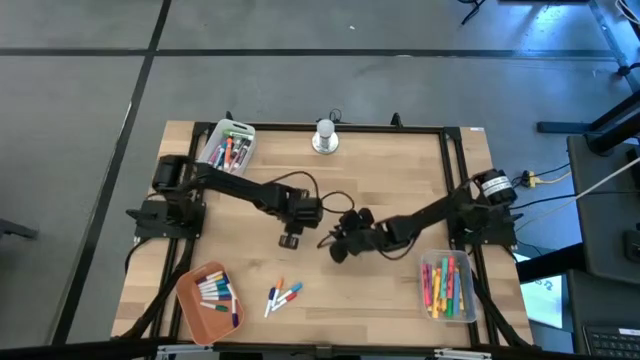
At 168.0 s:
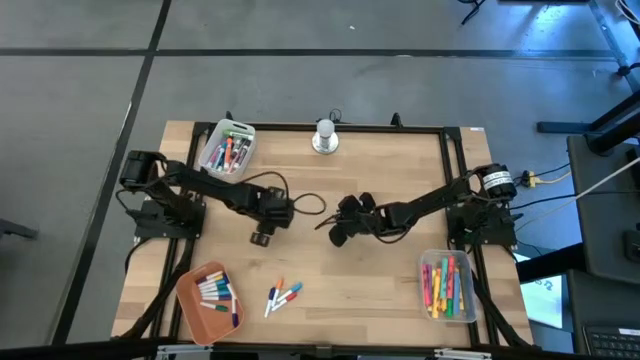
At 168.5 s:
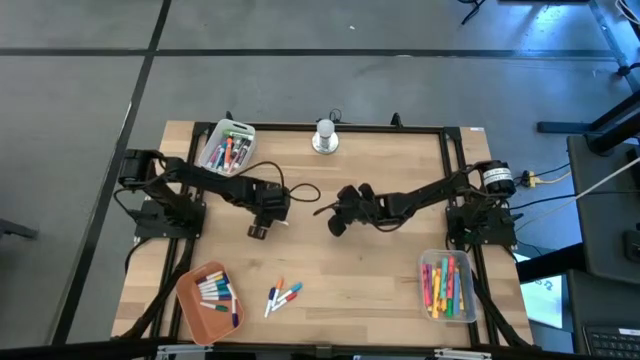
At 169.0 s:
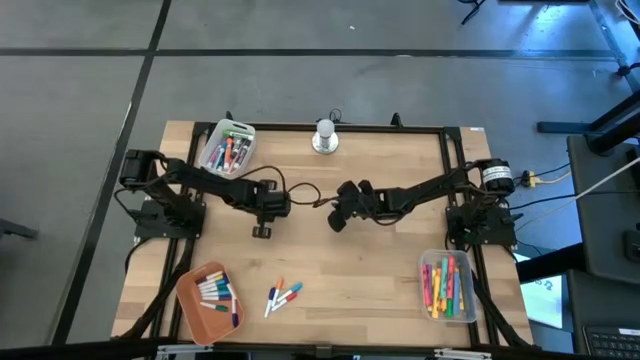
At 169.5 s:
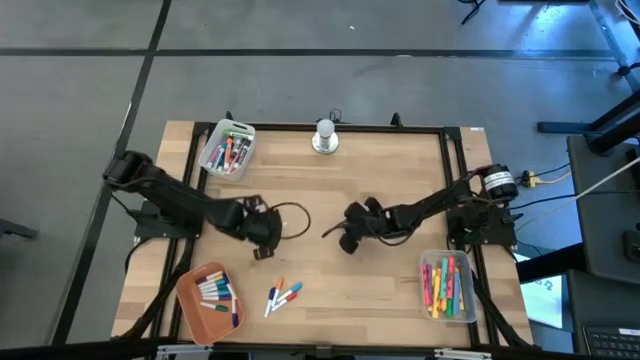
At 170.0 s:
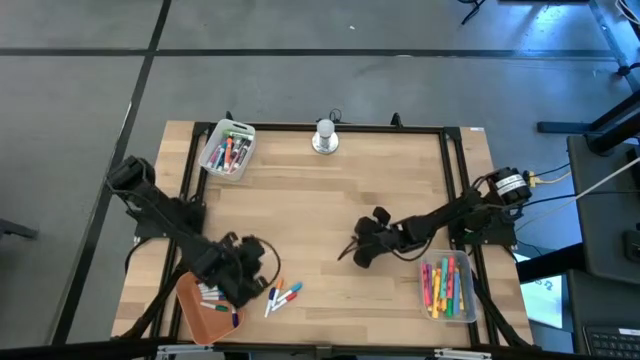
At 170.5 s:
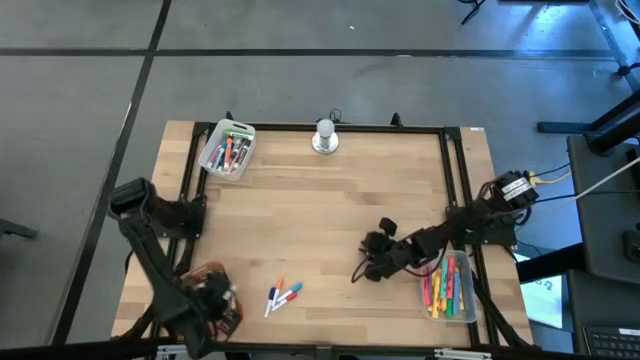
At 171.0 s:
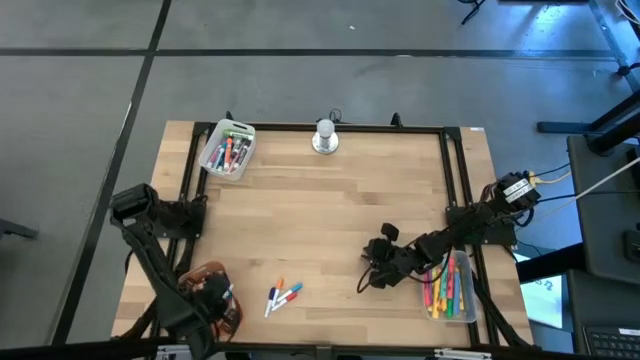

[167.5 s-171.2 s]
Task: Pick & Place Markers
Put the red and white highlighter pen into the orange bin

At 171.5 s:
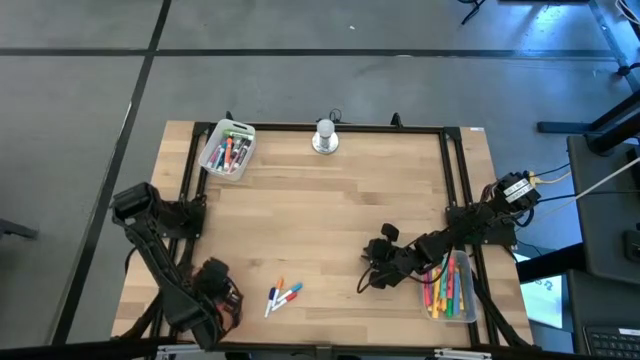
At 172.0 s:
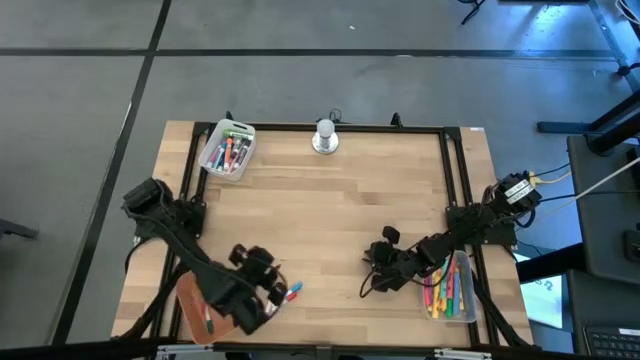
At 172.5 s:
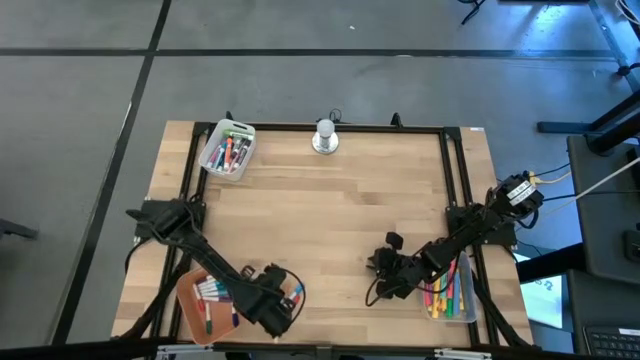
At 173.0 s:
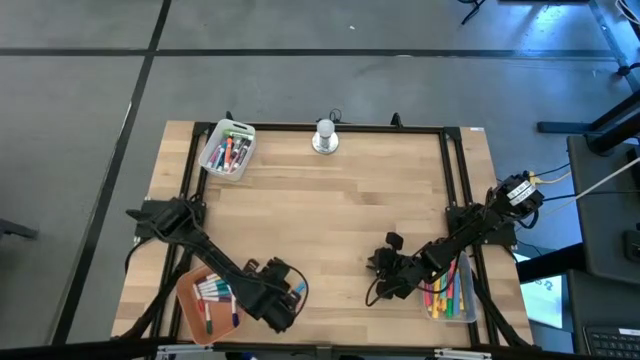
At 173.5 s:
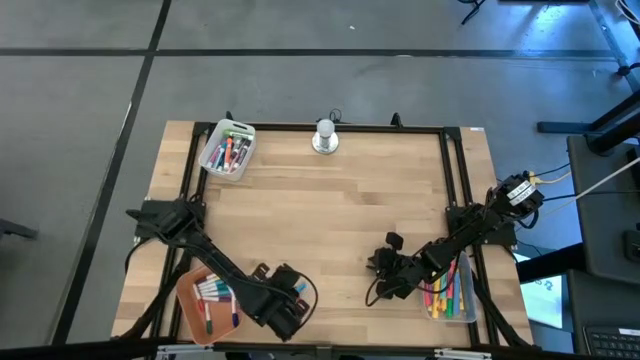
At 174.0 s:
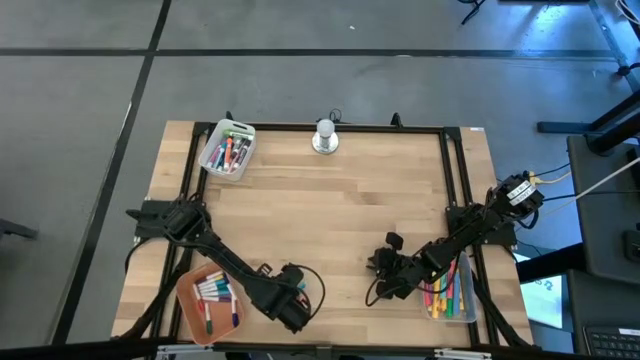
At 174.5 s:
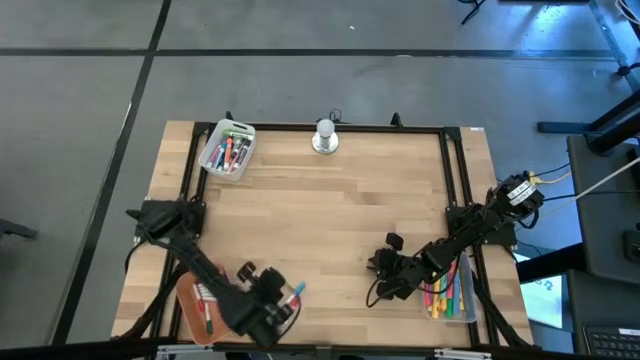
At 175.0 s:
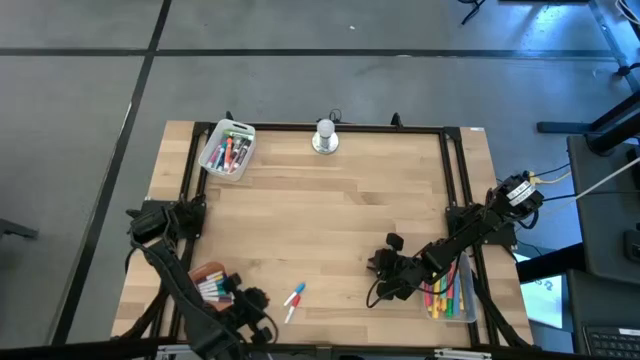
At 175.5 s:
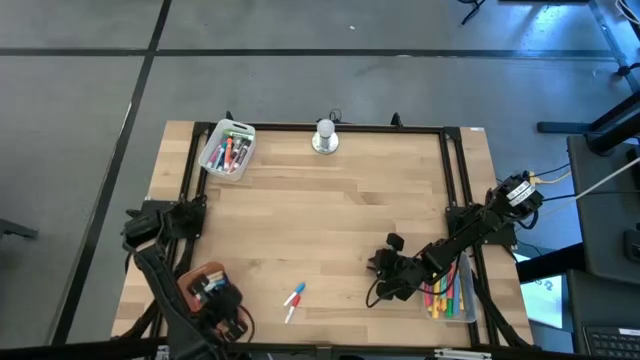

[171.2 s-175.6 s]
Put the orange and white highlighter pen into the orange bin

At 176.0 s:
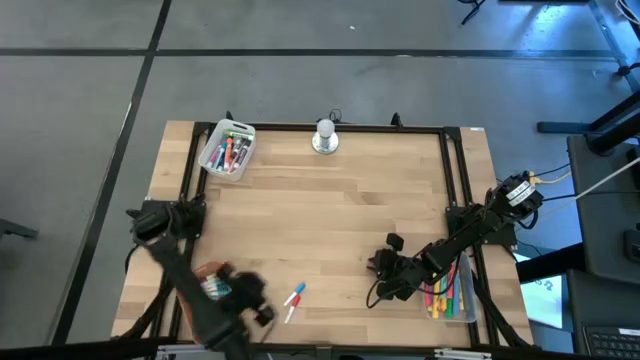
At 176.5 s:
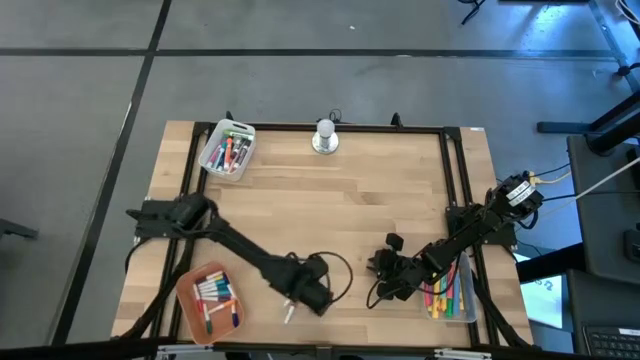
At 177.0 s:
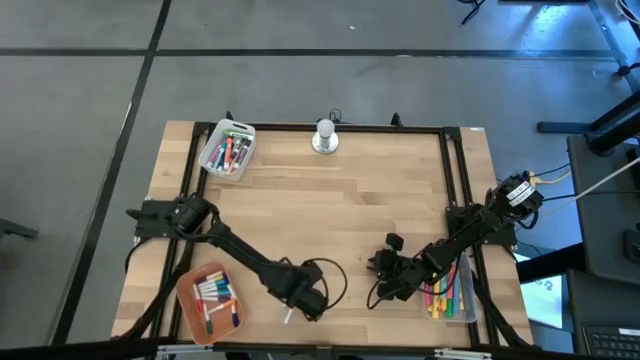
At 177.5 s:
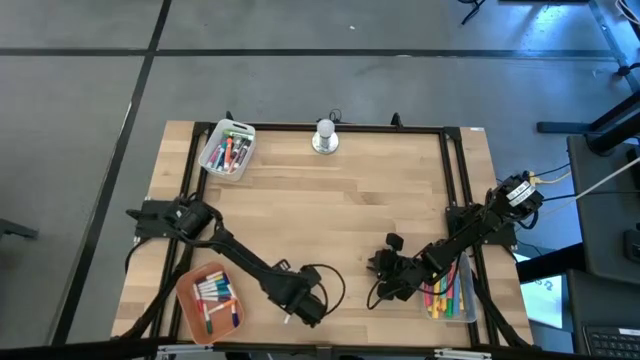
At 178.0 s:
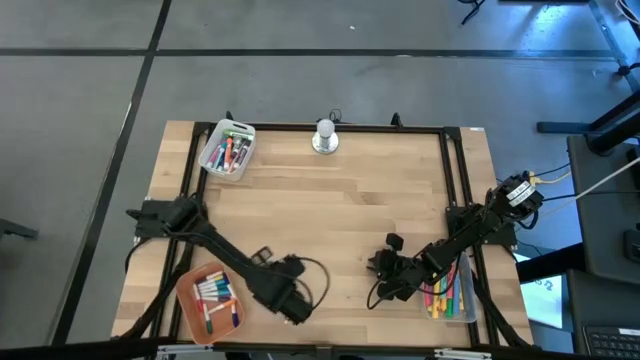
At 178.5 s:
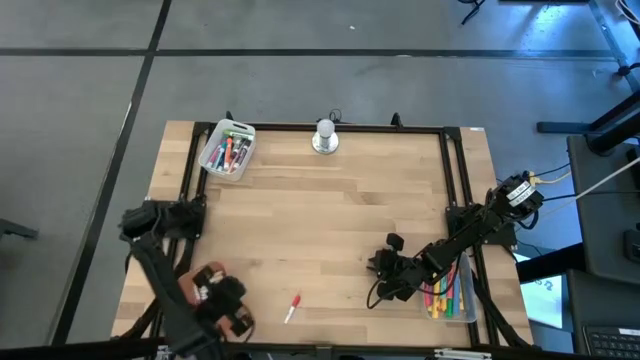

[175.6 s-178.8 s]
Put the light blue and white highlighter pen into the orange bin

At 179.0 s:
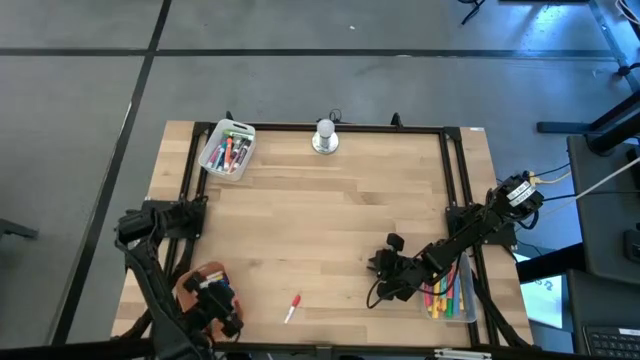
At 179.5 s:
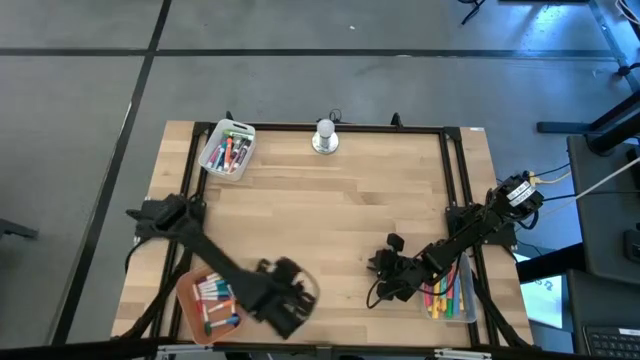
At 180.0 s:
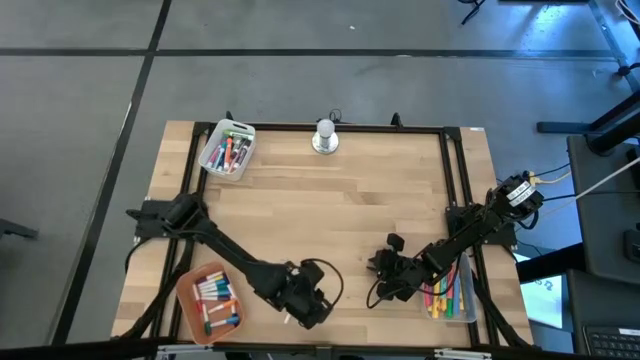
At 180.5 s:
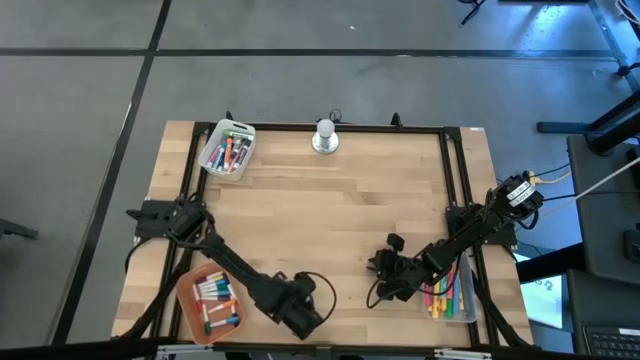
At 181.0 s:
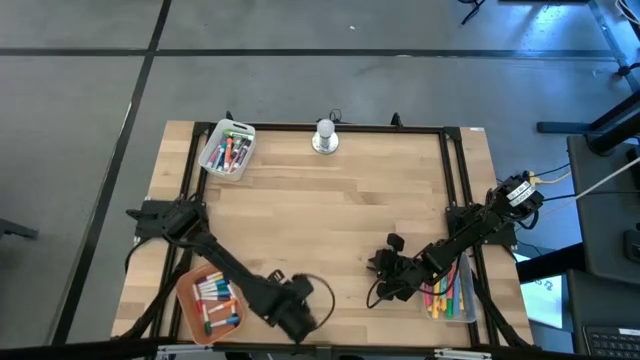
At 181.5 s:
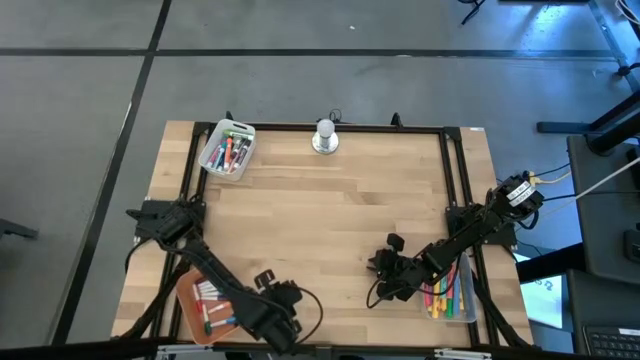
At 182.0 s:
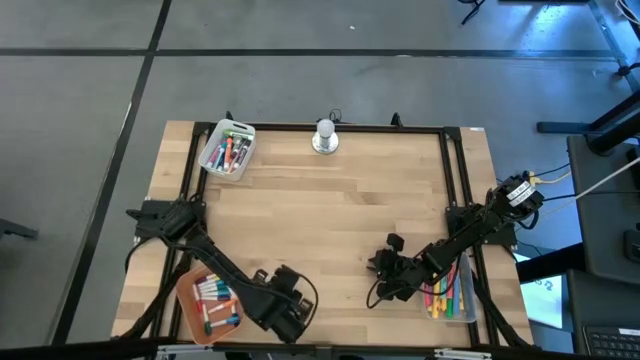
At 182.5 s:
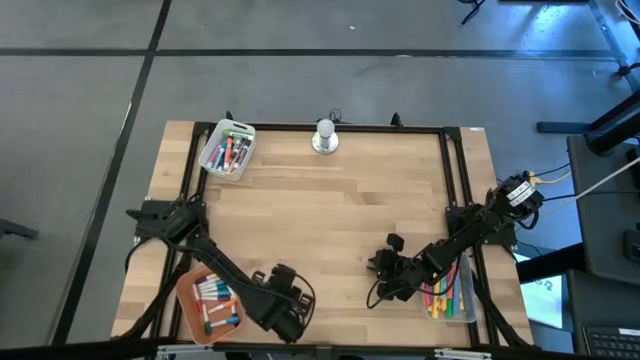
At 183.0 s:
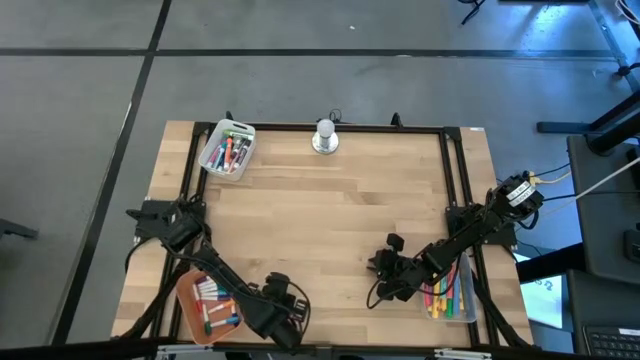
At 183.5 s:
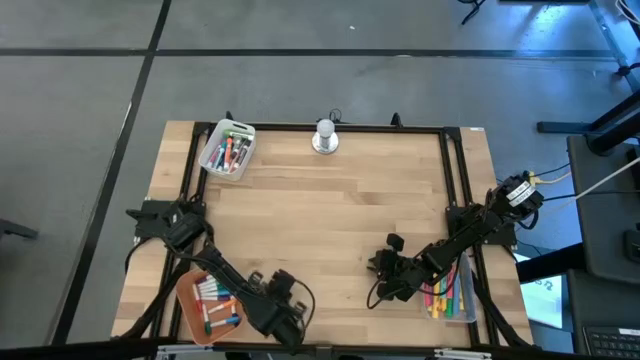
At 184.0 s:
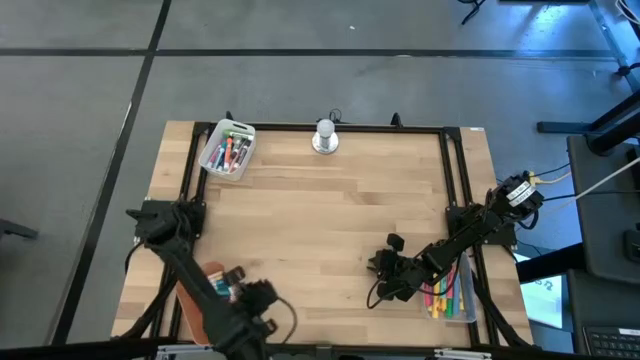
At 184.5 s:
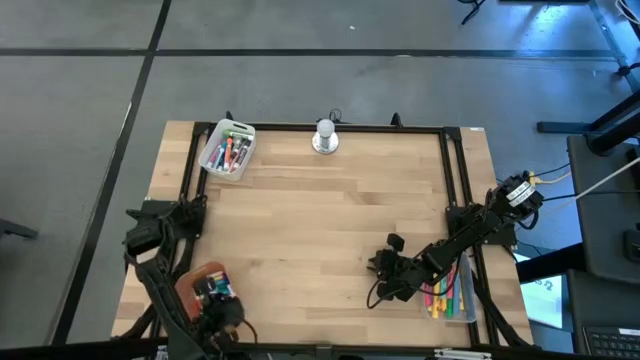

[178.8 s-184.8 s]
Put the red and white highlighter pen into the orange bin

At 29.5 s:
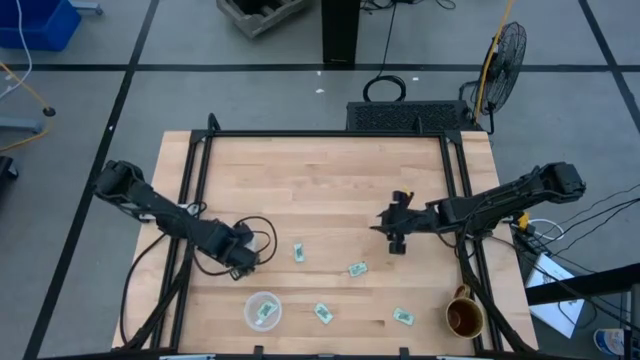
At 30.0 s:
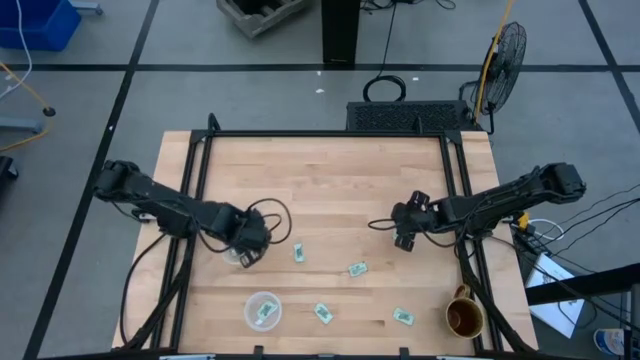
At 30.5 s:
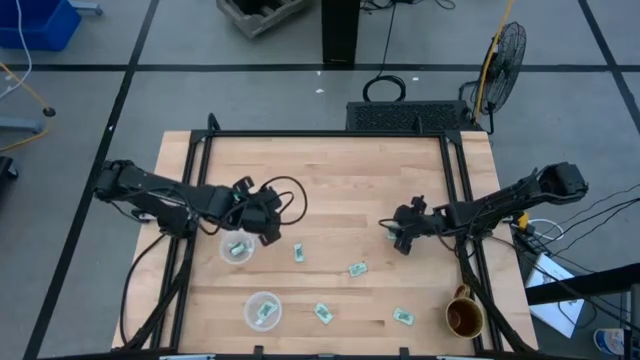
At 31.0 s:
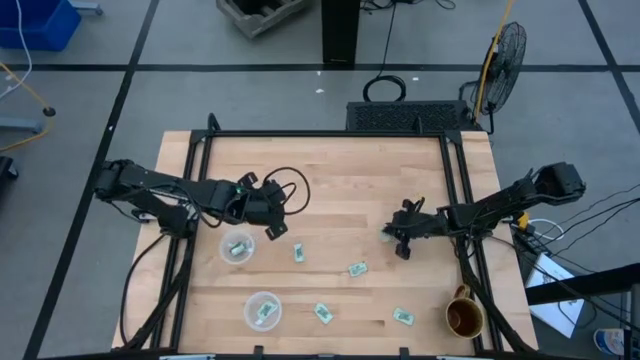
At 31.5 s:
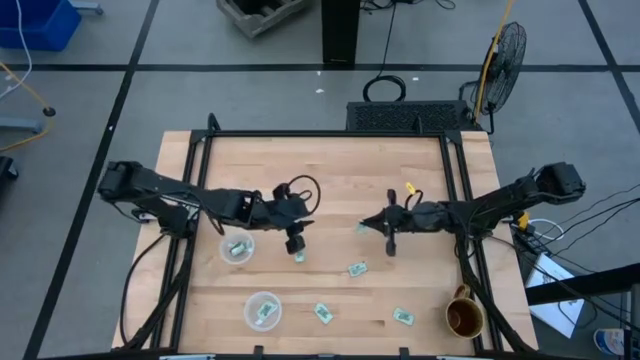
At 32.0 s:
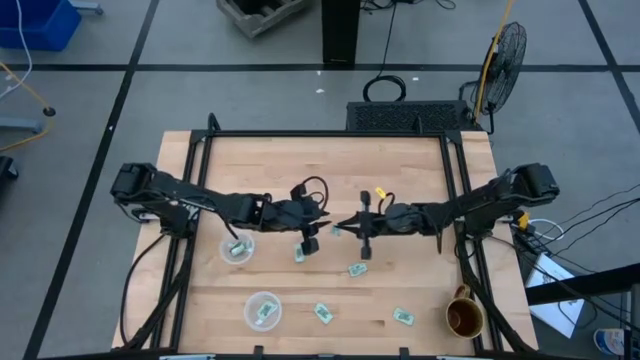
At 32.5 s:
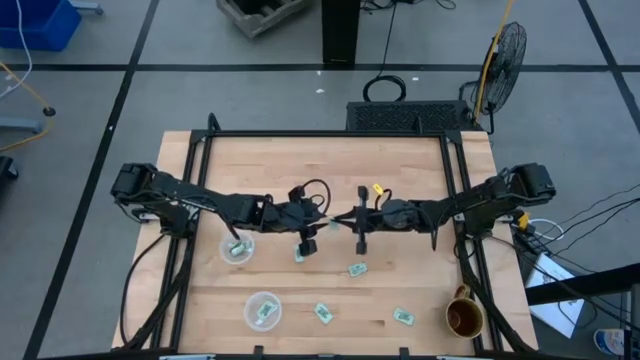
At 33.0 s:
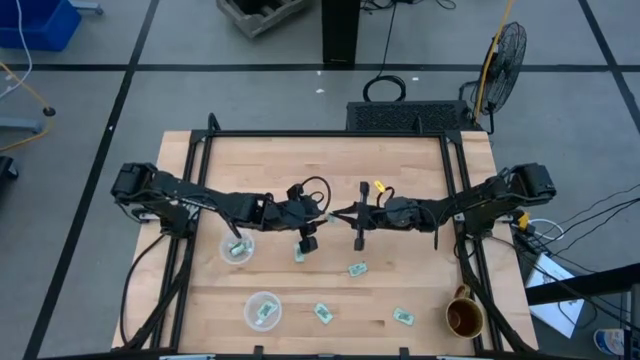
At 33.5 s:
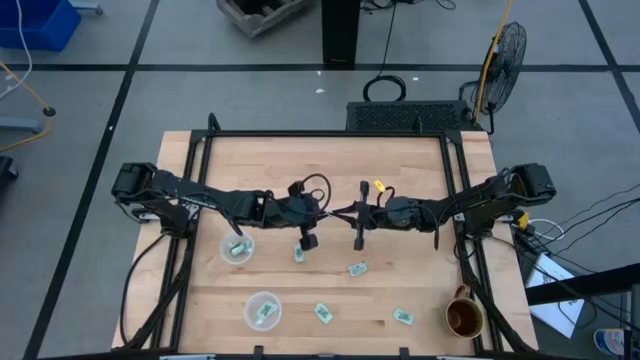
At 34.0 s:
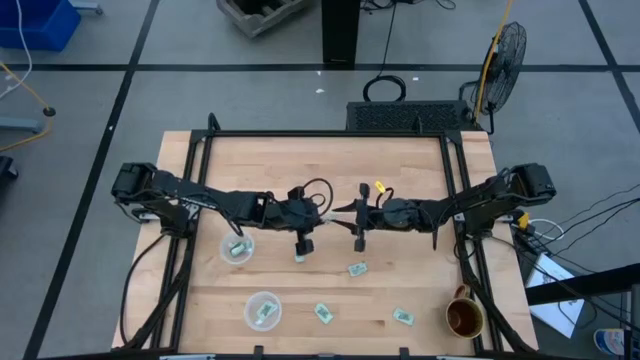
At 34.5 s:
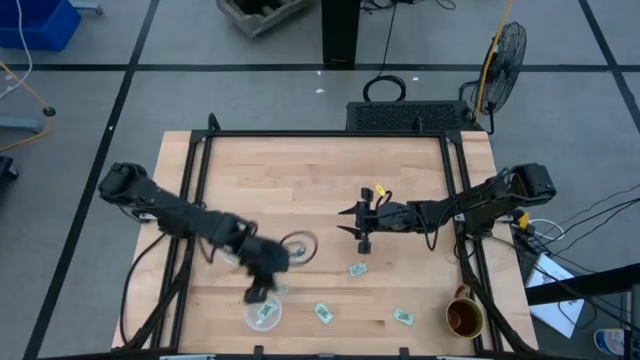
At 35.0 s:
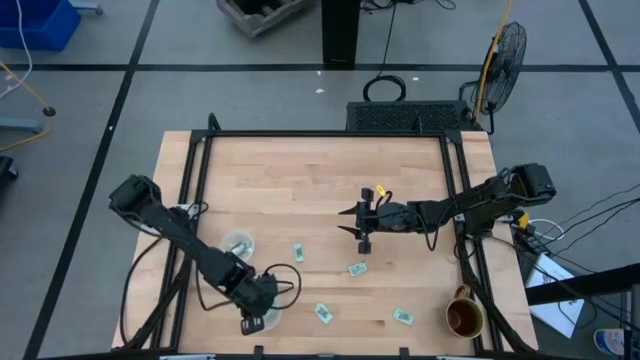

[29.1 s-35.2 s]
Task: Pick and place Stevia / Truvia into bins
Put the stevia packet into the bottom container
